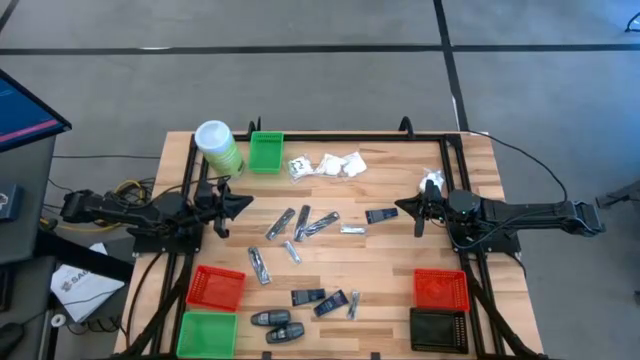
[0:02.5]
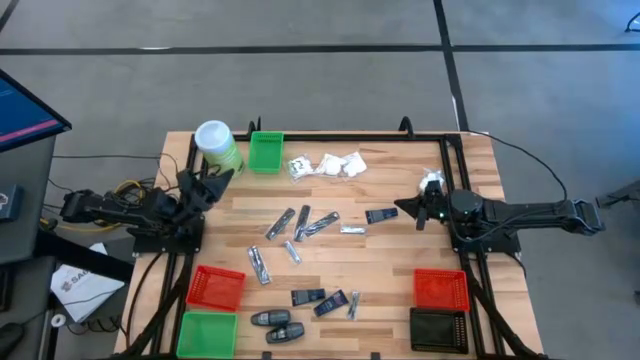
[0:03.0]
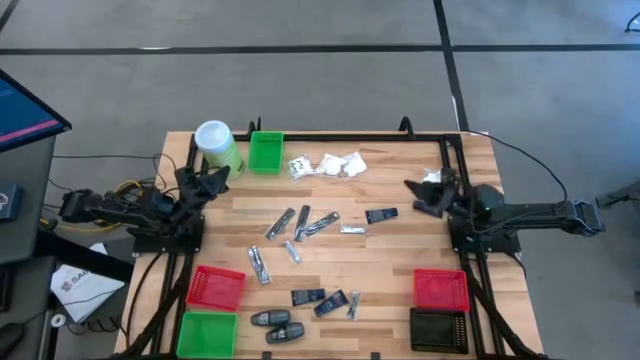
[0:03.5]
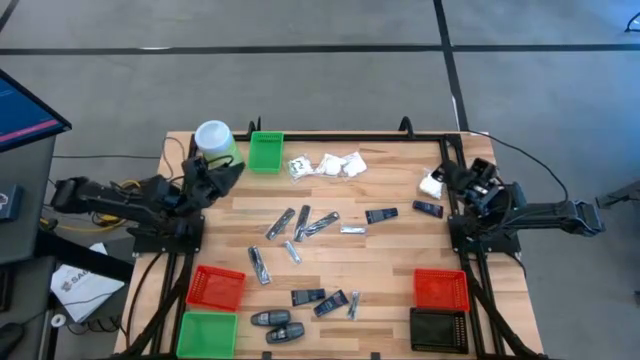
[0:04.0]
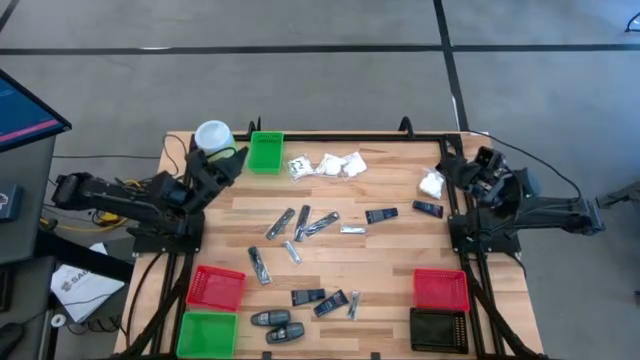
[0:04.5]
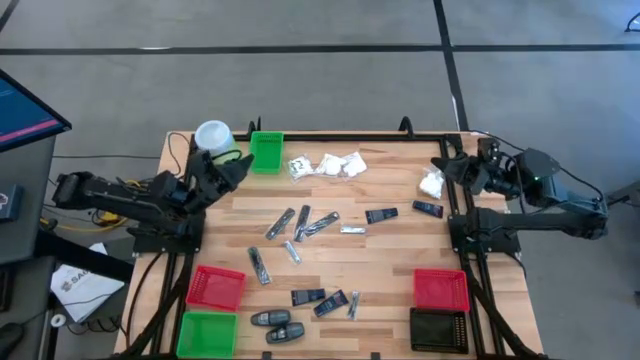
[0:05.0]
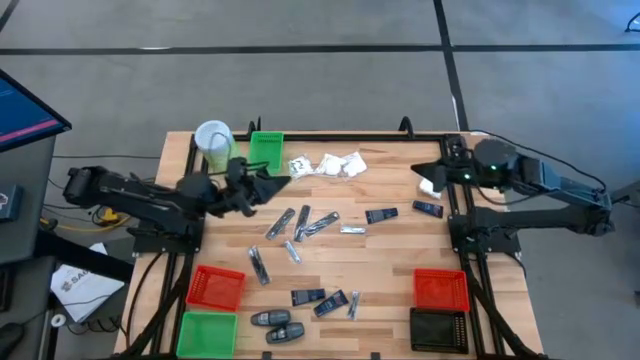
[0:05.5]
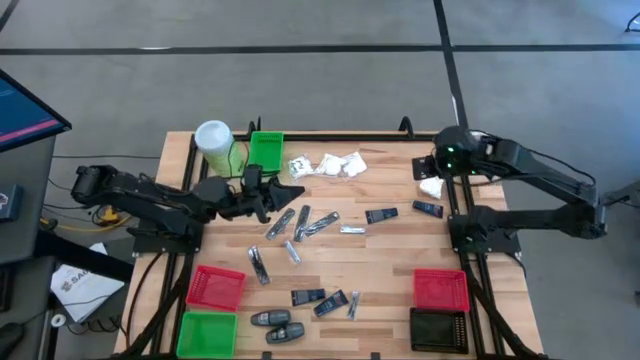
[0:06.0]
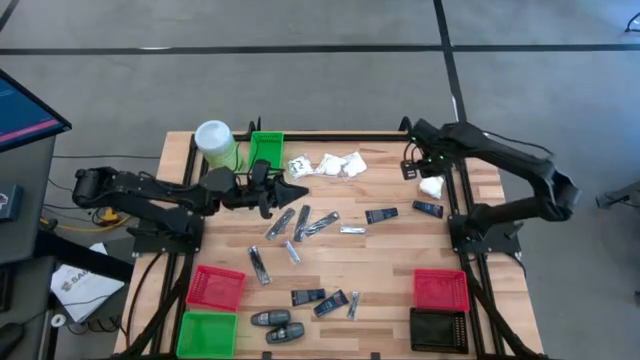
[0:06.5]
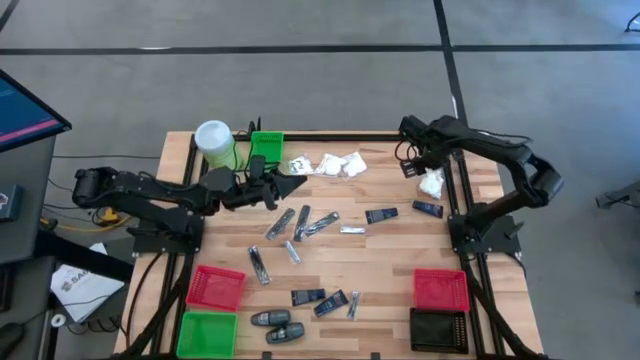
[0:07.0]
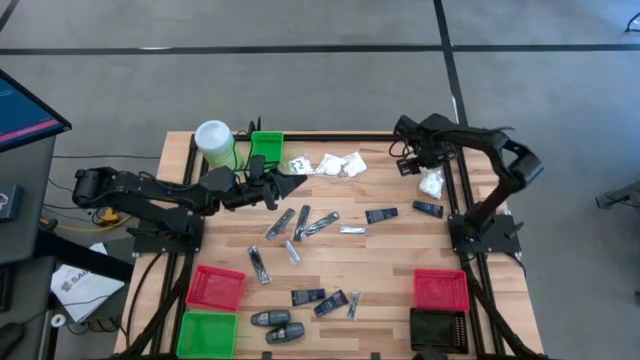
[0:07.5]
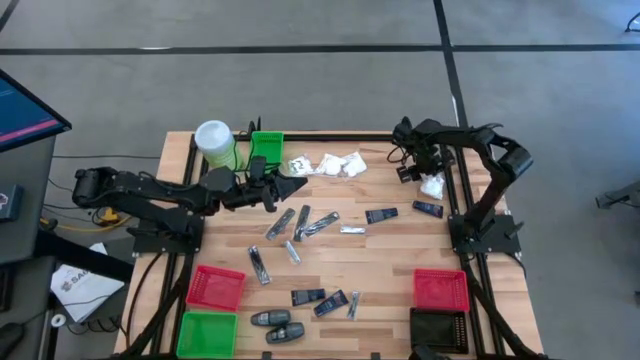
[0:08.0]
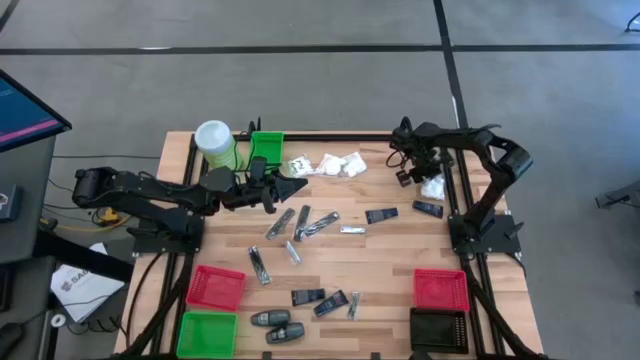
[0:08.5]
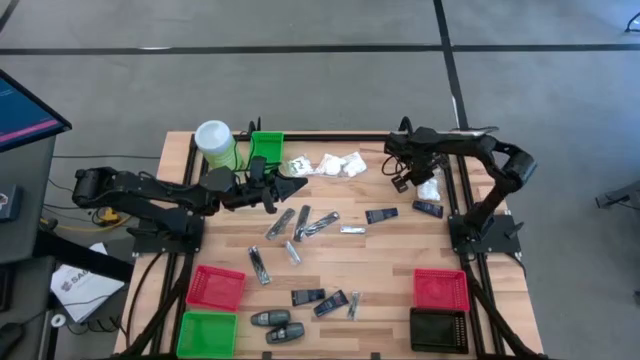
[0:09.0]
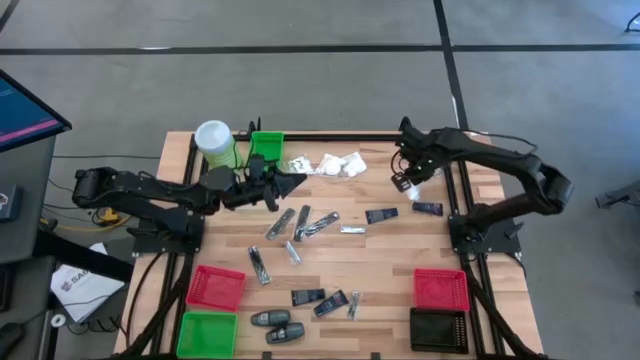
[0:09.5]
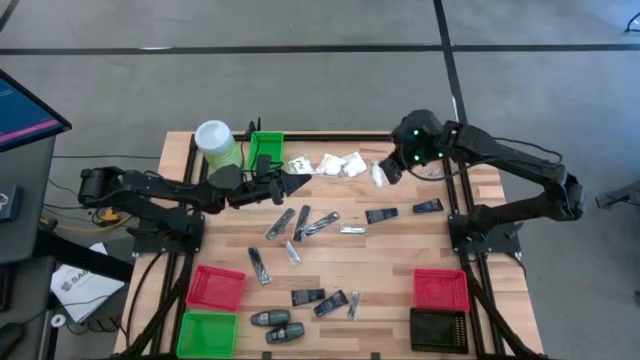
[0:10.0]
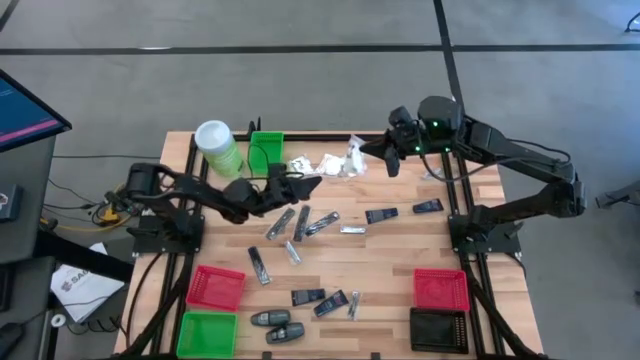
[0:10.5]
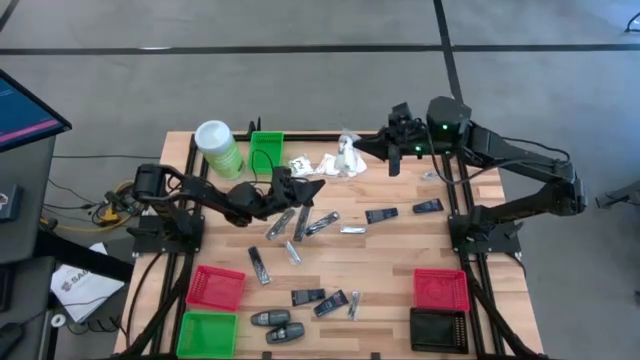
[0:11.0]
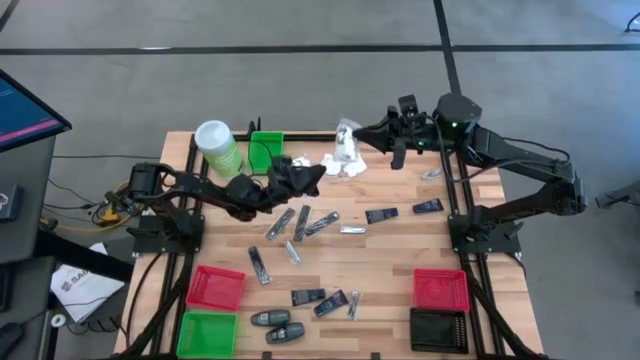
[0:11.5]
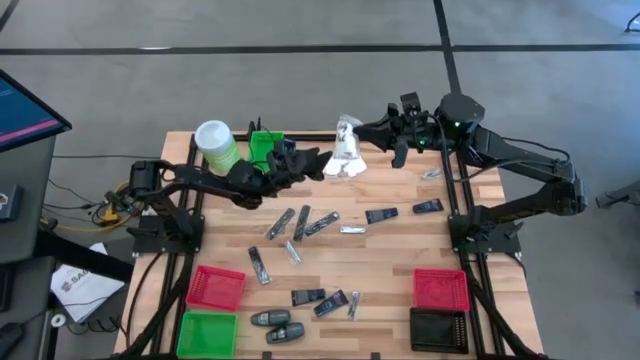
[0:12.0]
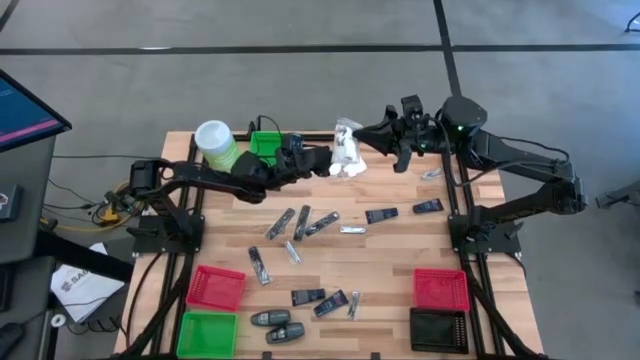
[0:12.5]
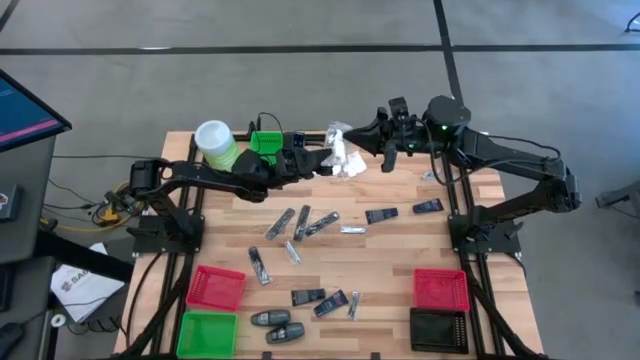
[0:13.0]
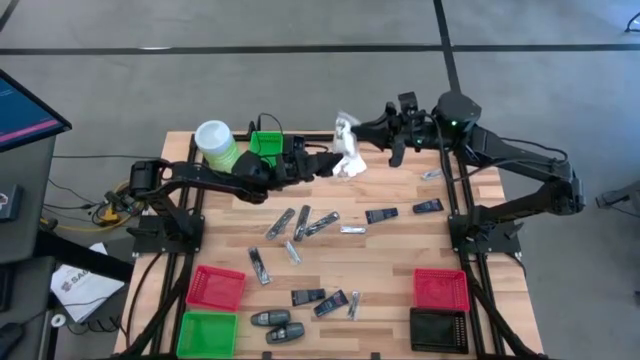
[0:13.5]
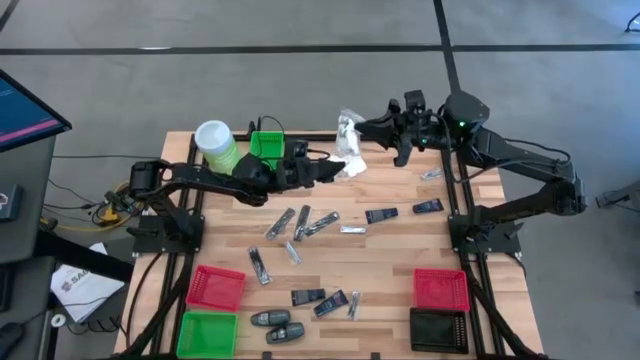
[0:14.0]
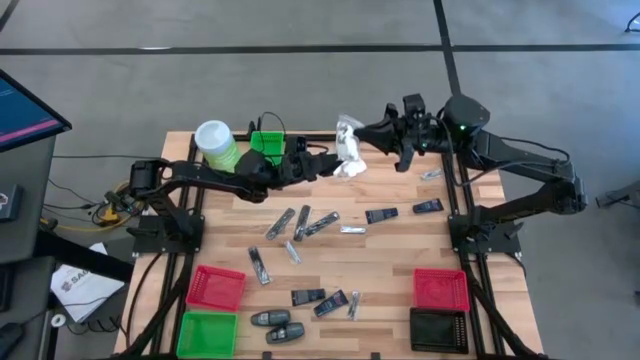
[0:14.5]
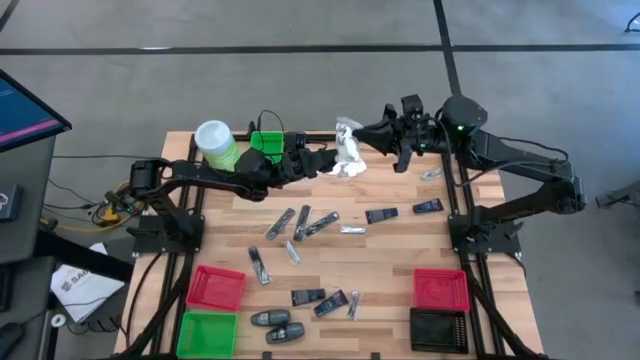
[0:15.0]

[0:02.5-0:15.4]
Task: Pick & Place Travel size toiletries
Put the cotton pack into the right red bin

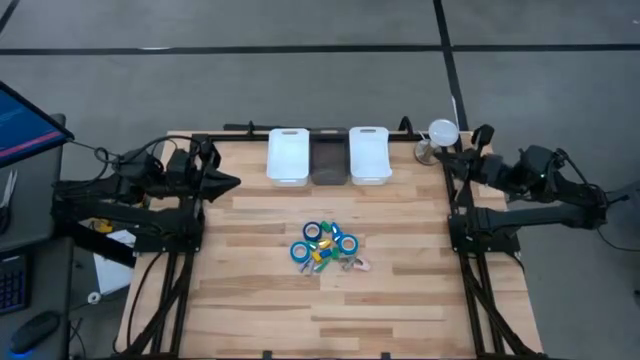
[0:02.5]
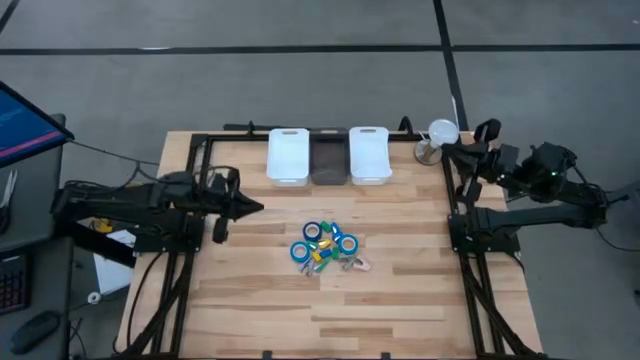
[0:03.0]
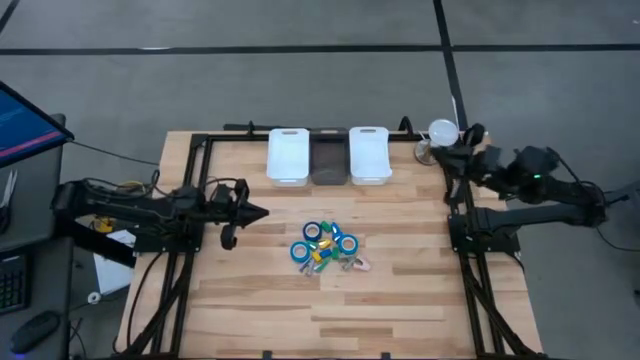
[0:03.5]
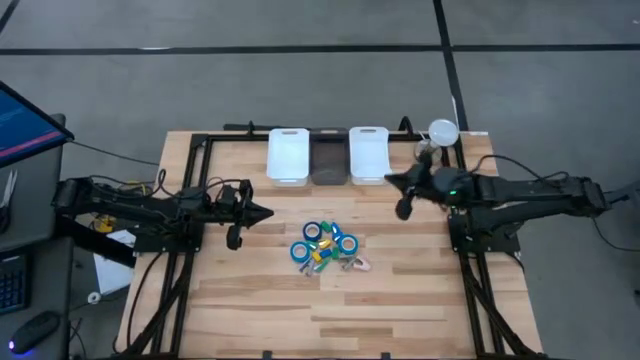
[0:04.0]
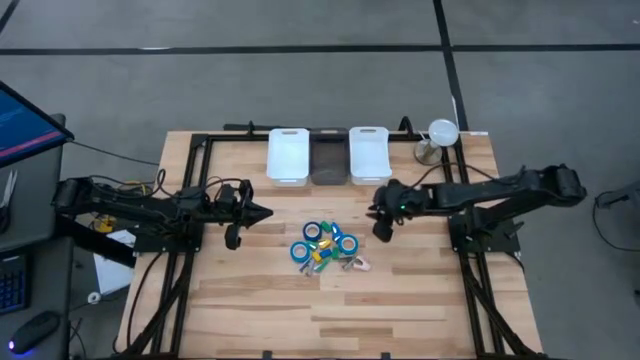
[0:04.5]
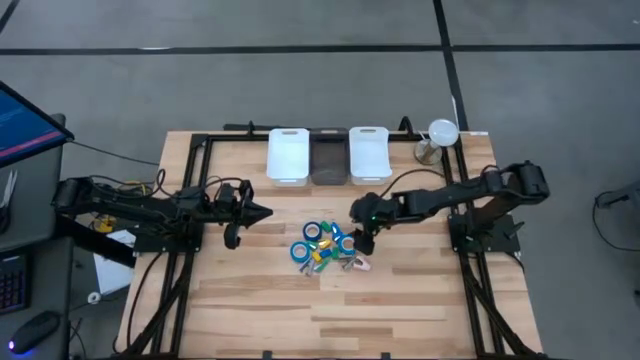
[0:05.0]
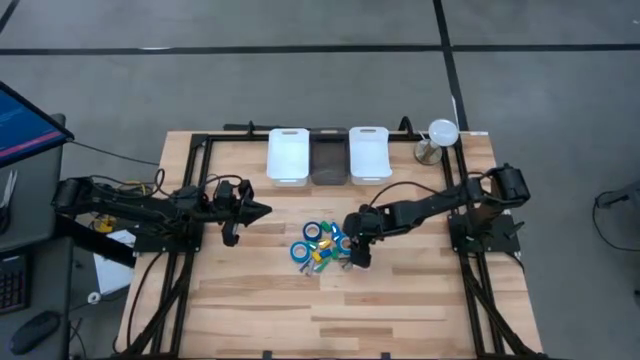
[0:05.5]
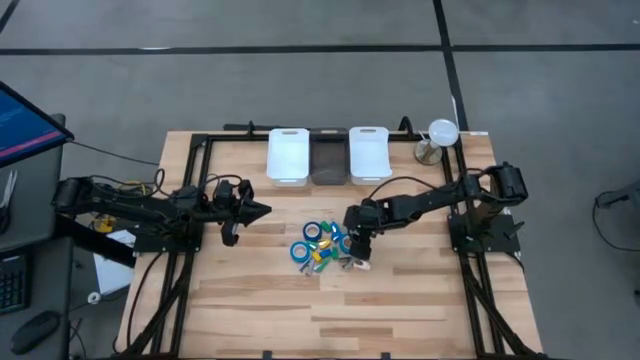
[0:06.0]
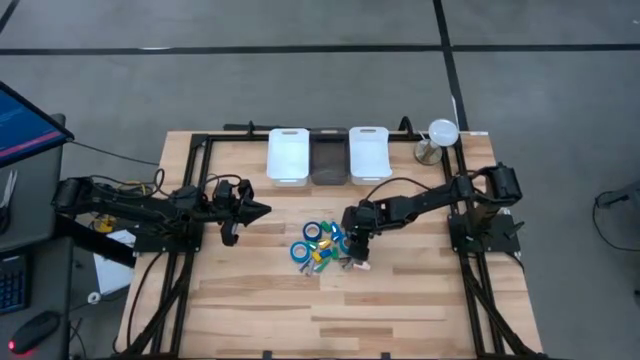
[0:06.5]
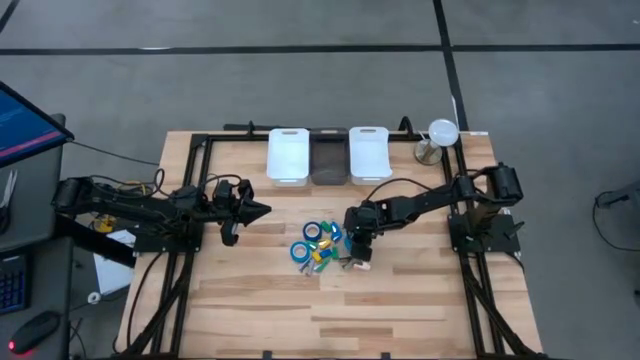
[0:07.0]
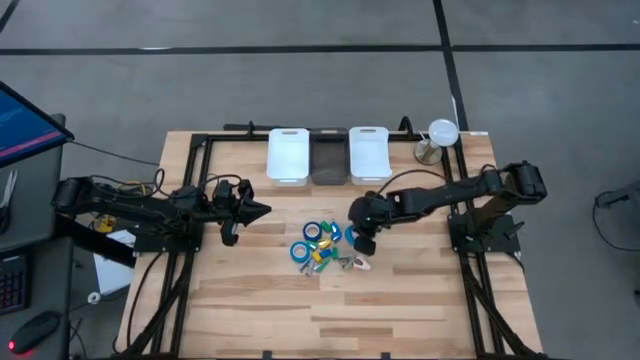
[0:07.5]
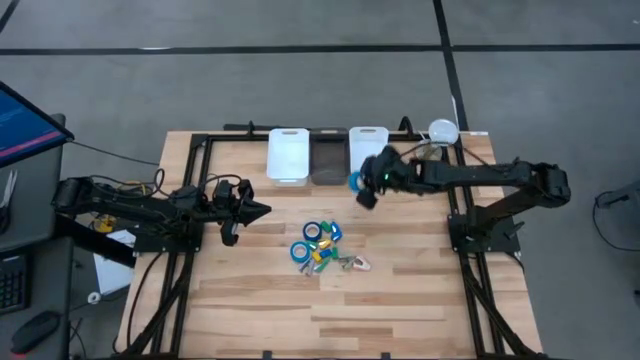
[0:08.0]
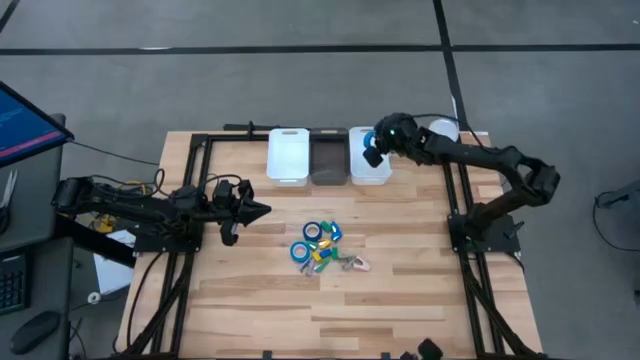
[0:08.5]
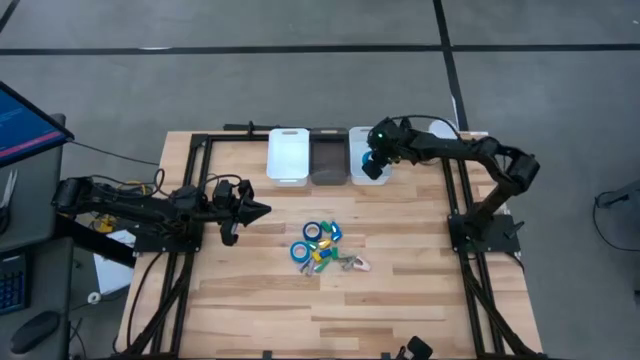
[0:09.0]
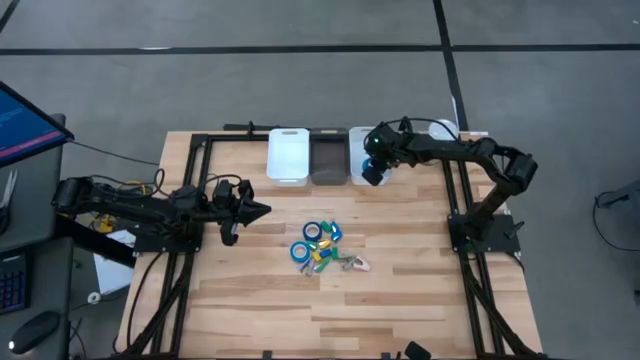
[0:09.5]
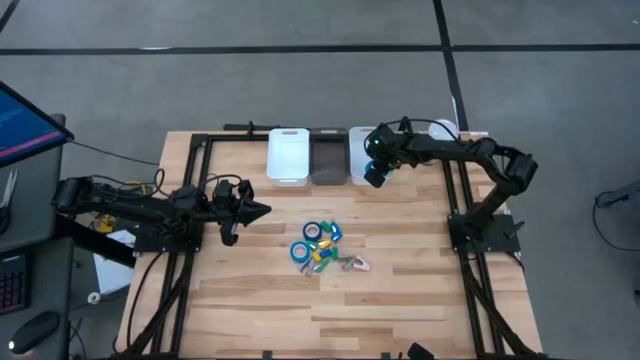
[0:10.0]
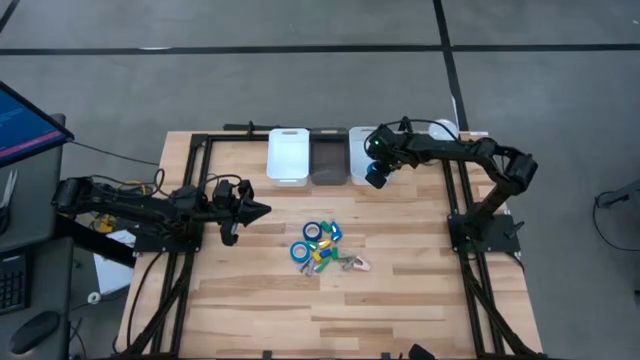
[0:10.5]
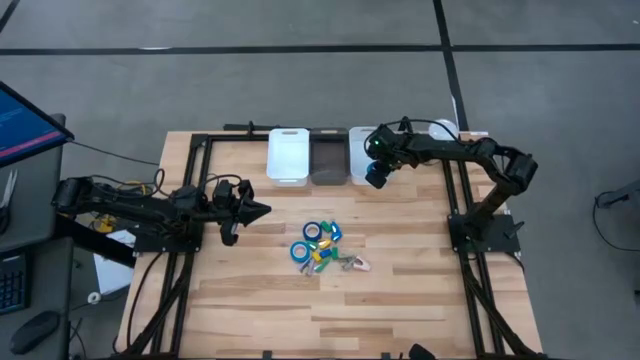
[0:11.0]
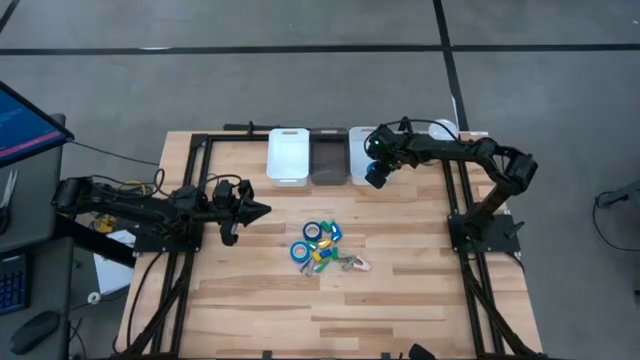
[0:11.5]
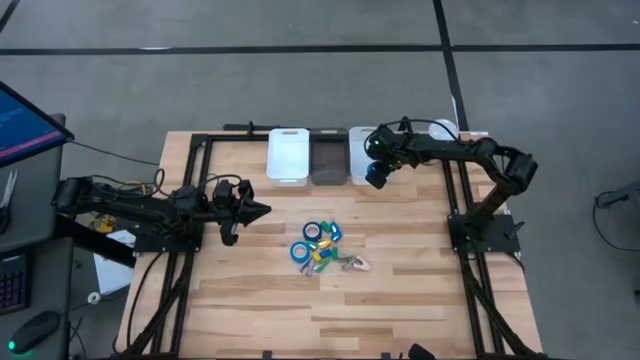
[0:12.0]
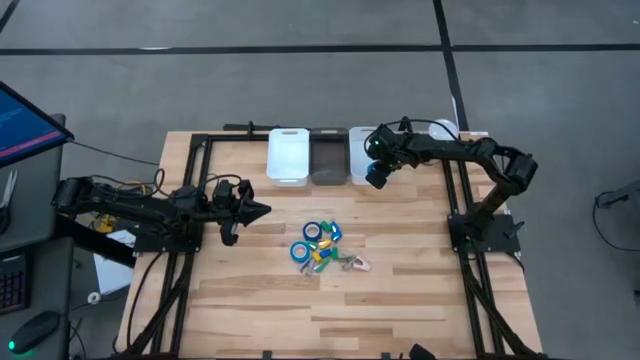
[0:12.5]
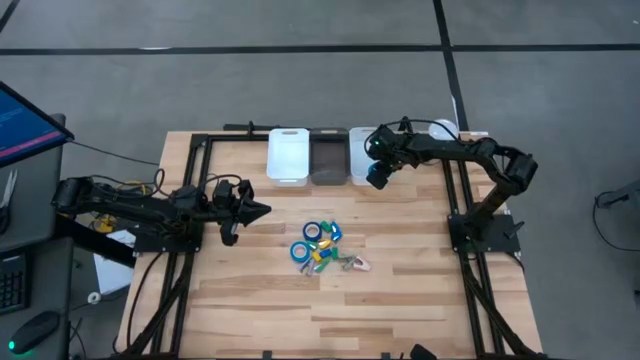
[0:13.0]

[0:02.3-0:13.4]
Task: Pick and place Stapler, Stapler remover, tape
Put the blue tape into the right white bin
